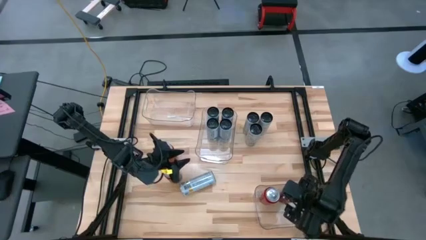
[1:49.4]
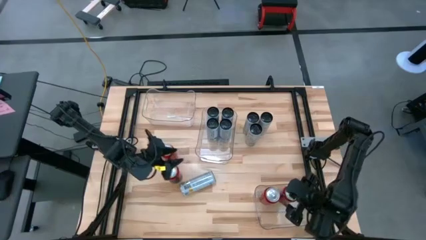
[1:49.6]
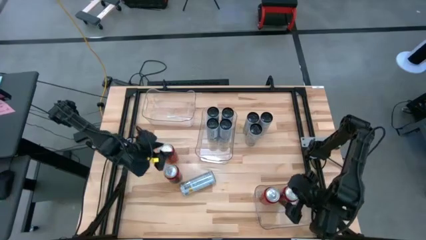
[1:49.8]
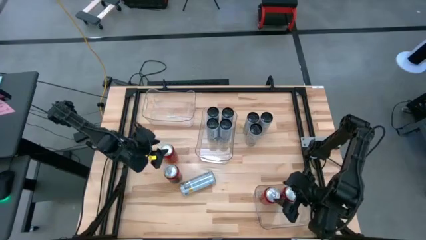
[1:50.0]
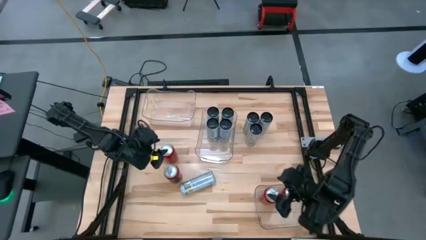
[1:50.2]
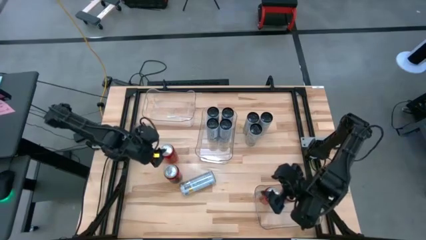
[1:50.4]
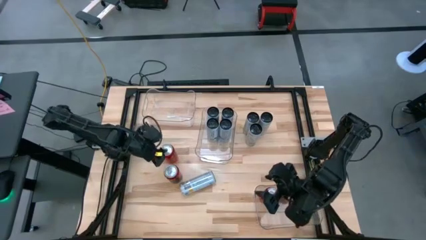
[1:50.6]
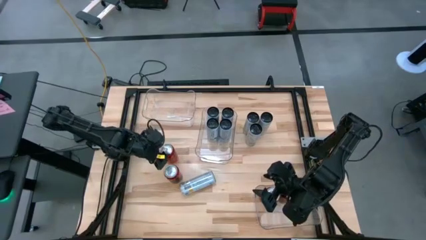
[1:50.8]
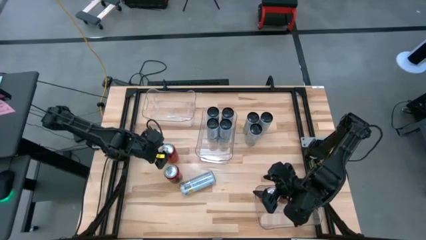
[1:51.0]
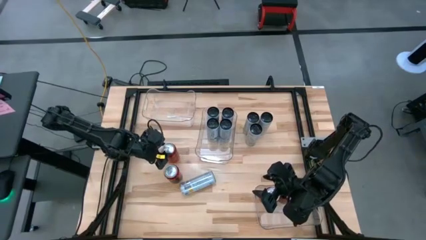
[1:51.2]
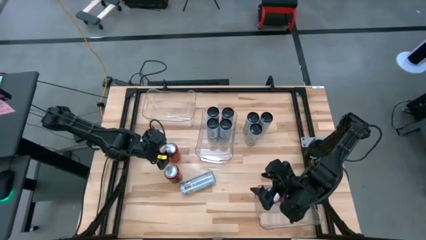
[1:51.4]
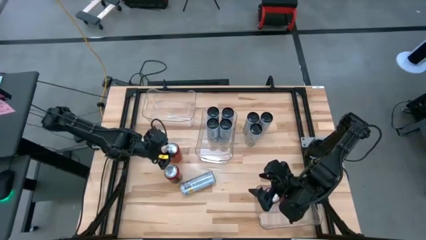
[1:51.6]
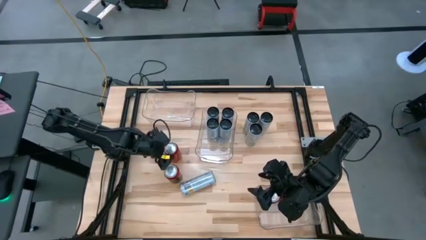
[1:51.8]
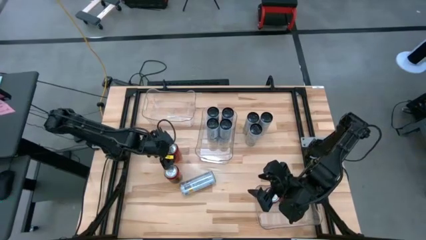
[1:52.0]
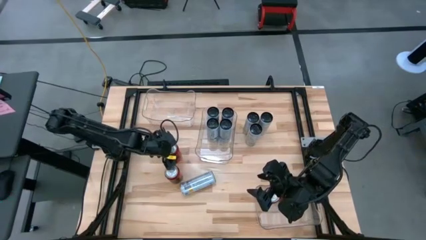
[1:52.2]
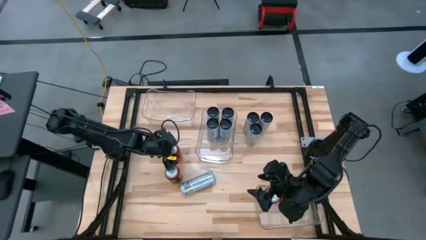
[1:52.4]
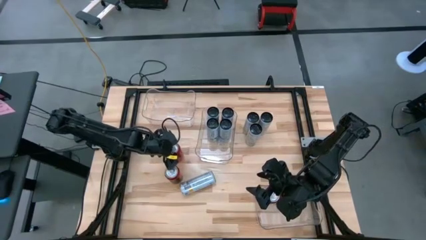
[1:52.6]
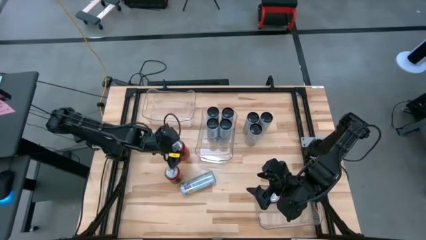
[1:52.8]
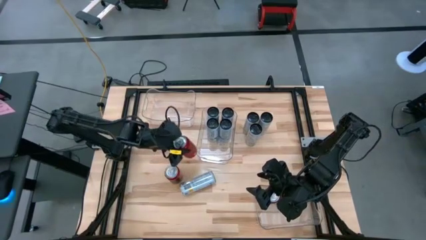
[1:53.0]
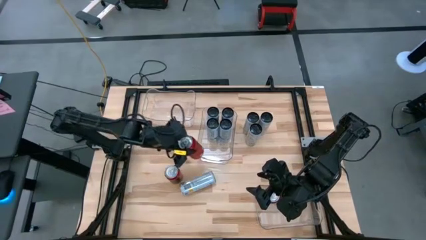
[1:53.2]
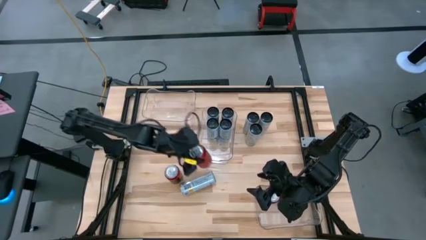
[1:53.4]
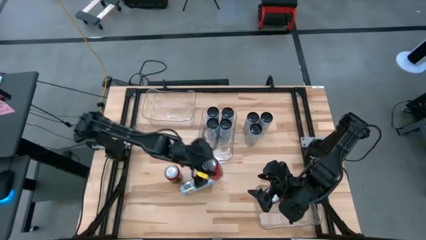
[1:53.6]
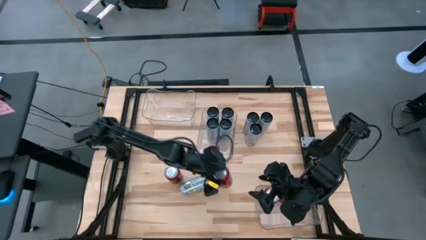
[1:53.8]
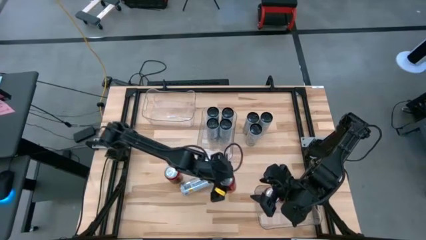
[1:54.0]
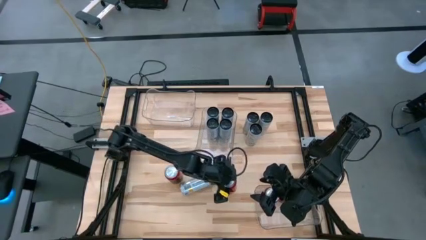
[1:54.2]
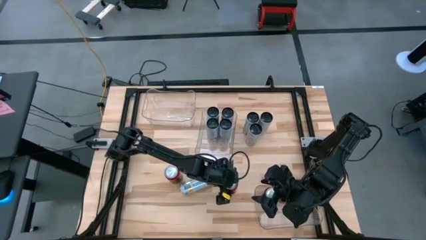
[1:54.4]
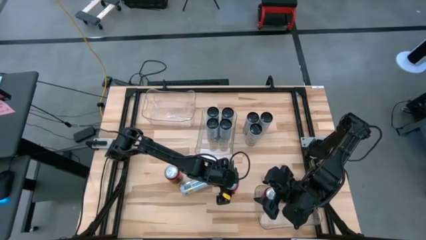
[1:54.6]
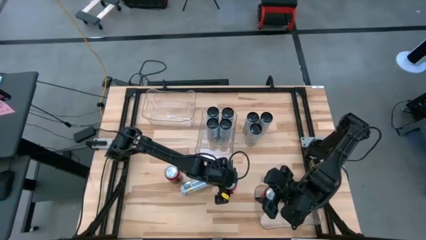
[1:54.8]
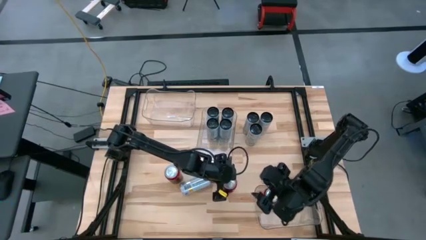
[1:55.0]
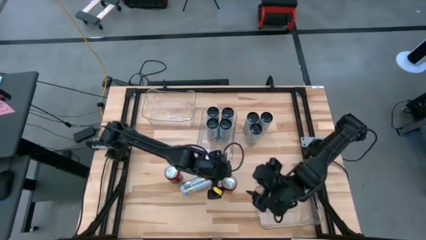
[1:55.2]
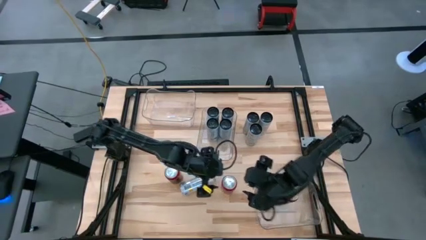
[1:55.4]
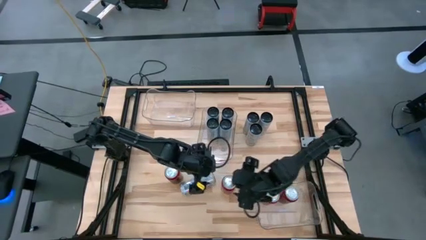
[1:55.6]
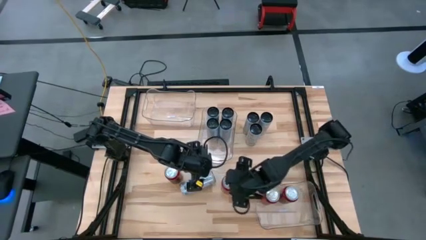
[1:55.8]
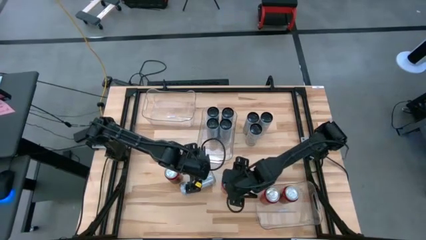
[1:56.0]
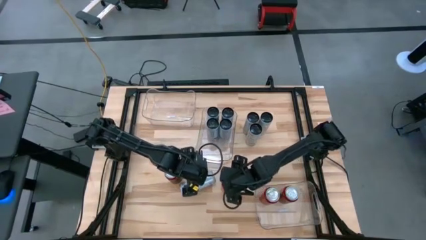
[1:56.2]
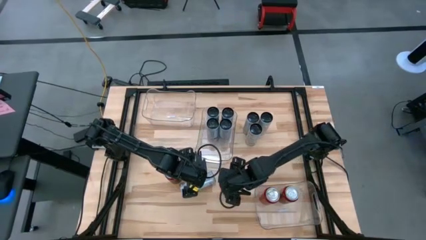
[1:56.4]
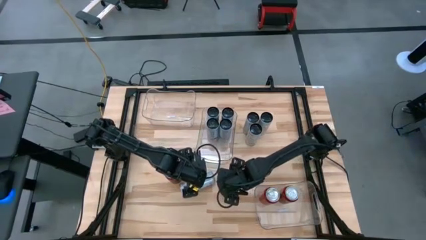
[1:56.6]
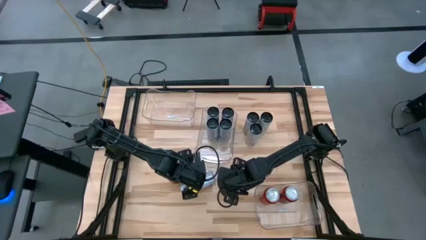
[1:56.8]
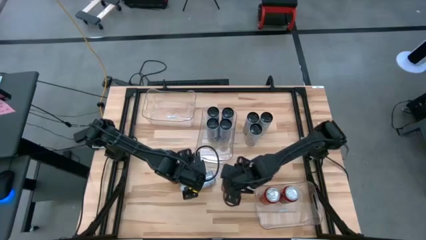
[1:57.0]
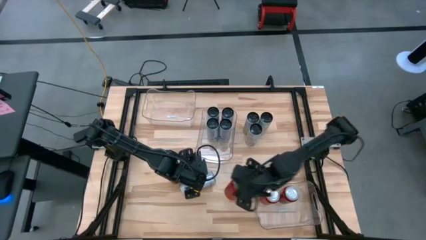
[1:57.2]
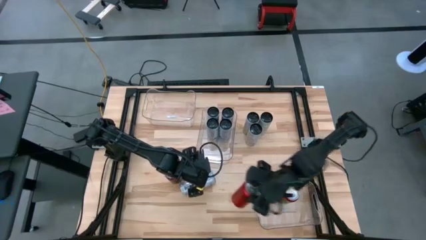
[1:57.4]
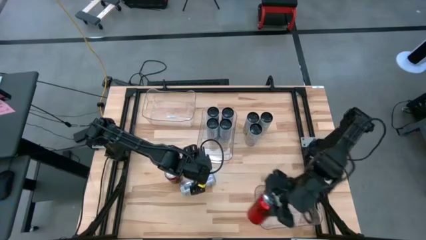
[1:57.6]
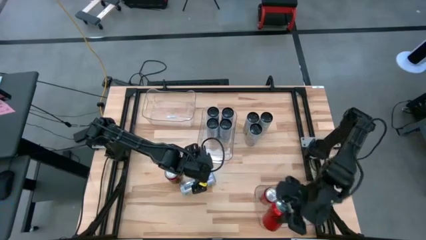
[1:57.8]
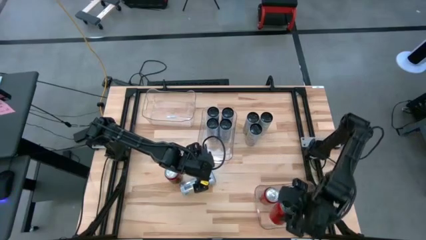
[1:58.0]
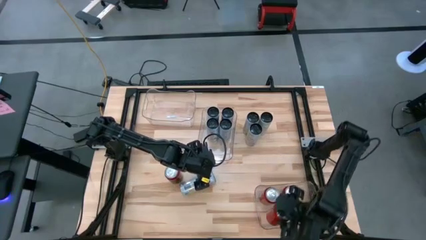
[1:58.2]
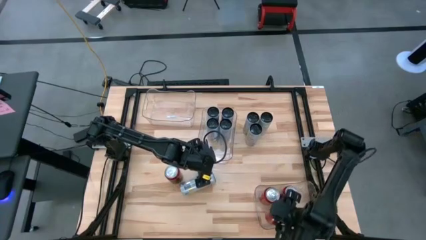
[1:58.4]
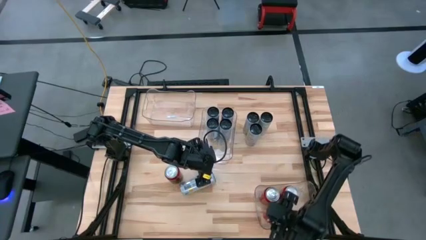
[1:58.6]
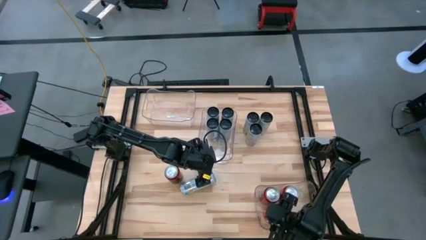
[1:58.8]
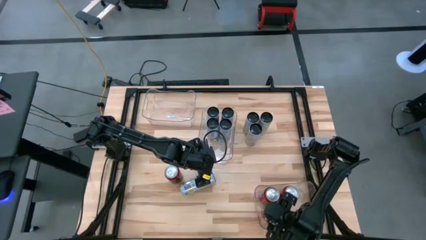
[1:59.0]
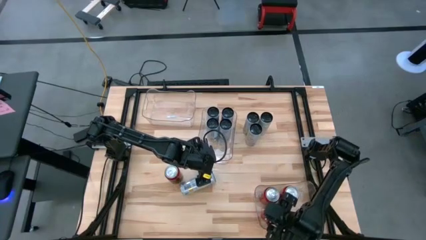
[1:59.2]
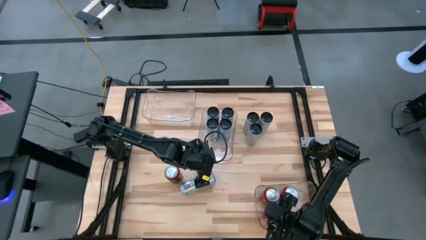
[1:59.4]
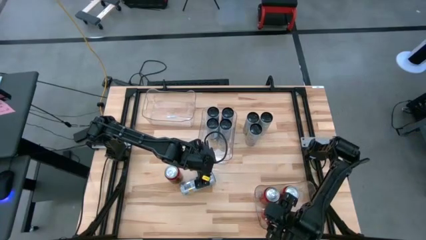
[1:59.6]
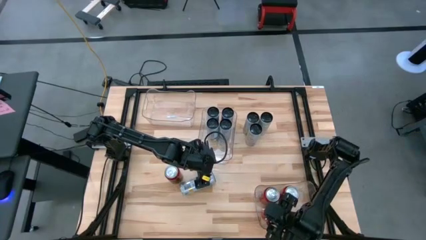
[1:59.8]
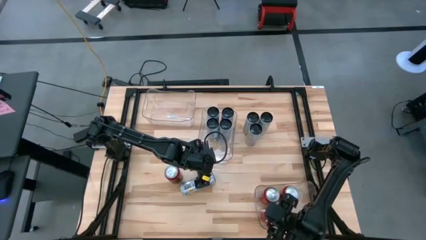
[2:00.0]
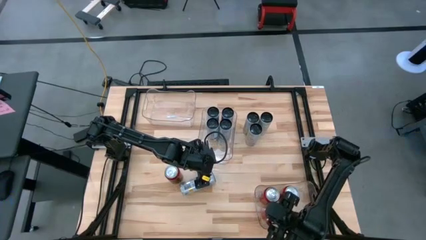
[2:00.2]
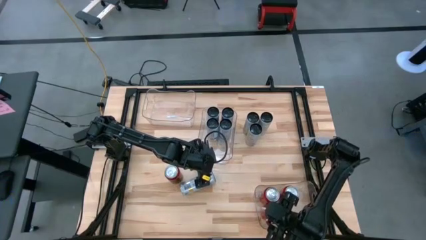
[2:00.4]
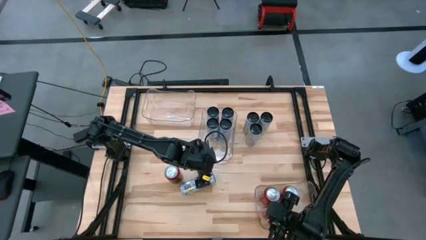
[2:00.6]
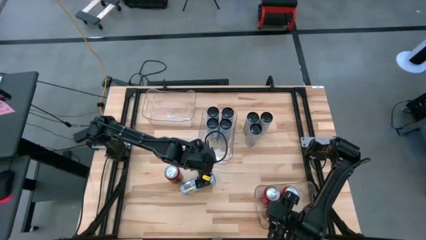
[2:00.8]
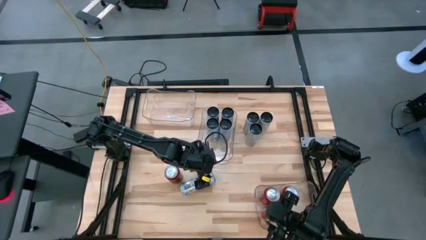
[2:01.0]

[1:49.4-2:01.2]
Task: Sort soda cans
Put the red soda can into the bottom transparent bin
